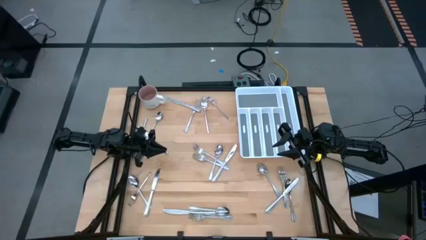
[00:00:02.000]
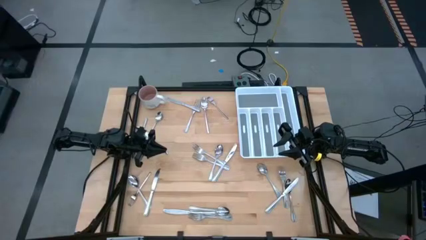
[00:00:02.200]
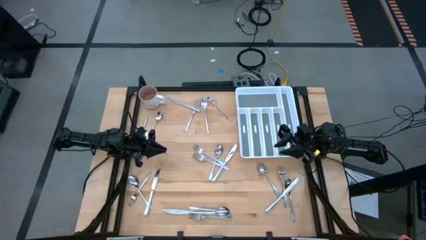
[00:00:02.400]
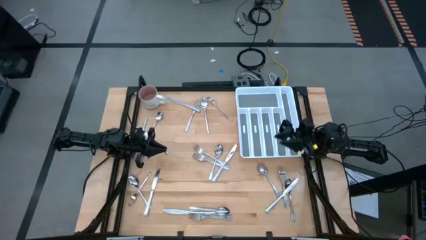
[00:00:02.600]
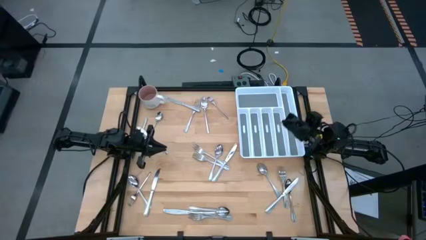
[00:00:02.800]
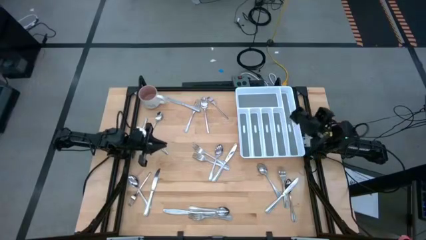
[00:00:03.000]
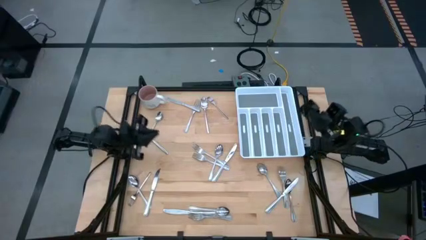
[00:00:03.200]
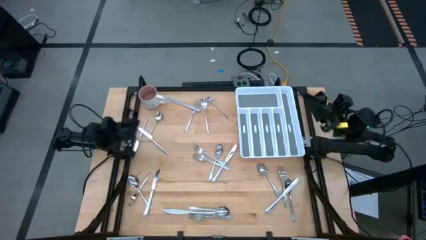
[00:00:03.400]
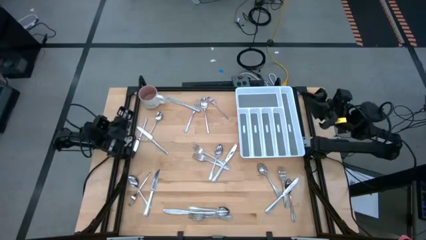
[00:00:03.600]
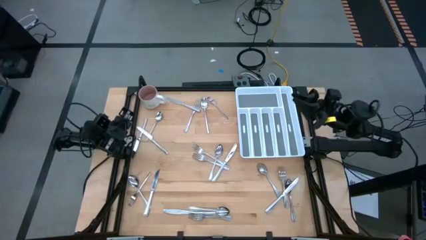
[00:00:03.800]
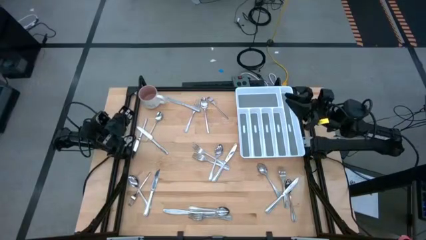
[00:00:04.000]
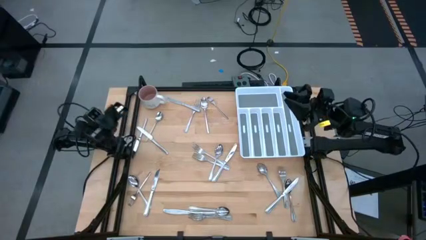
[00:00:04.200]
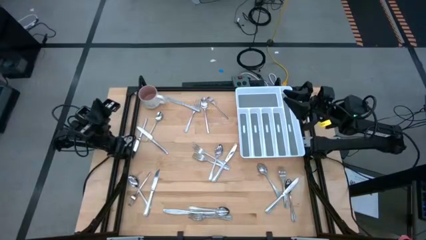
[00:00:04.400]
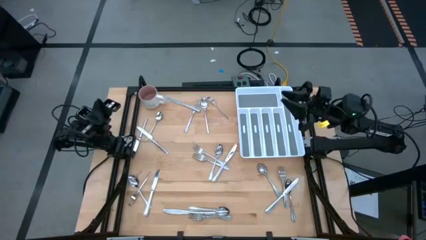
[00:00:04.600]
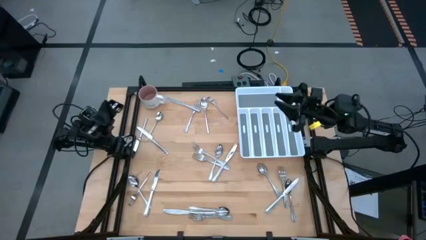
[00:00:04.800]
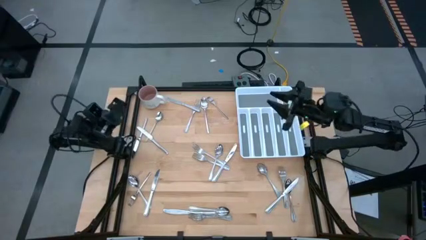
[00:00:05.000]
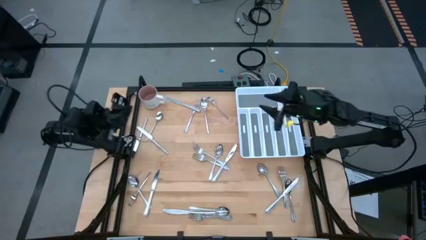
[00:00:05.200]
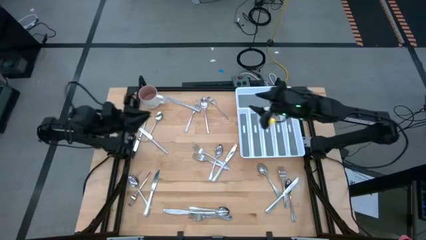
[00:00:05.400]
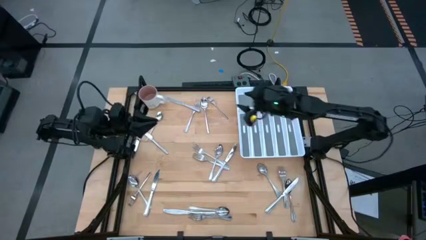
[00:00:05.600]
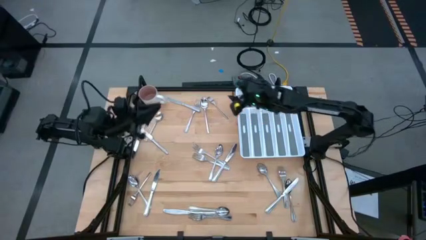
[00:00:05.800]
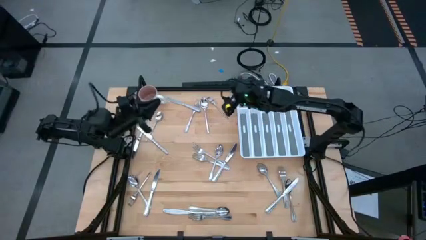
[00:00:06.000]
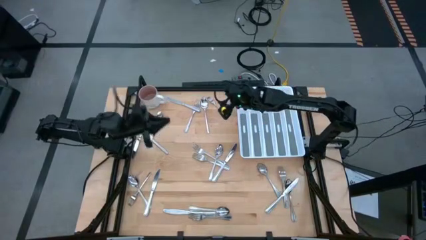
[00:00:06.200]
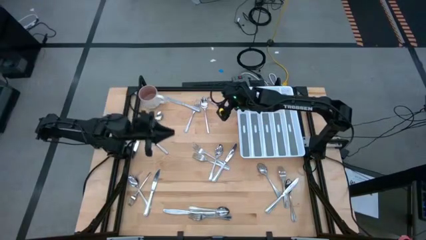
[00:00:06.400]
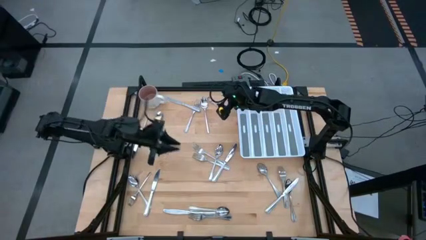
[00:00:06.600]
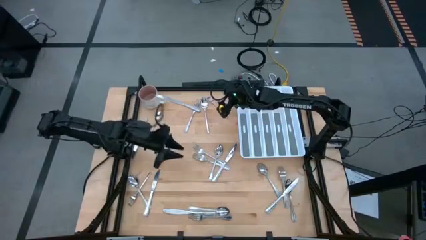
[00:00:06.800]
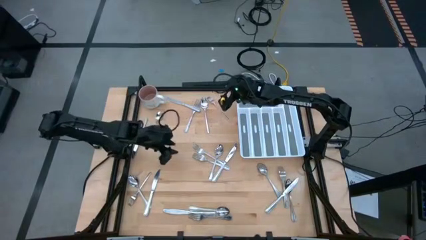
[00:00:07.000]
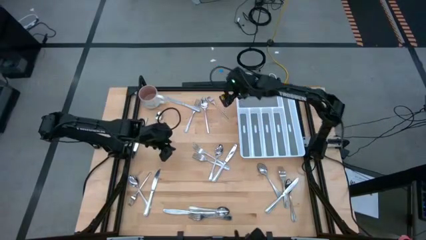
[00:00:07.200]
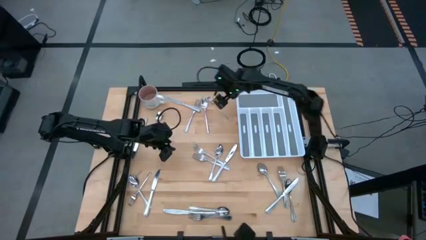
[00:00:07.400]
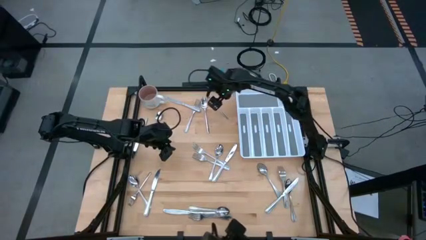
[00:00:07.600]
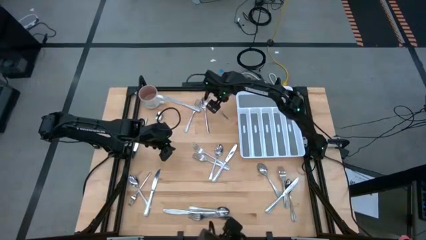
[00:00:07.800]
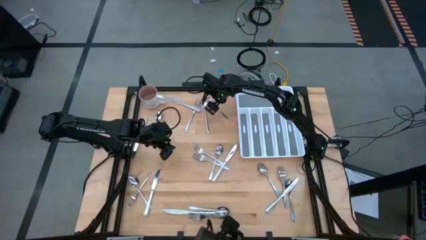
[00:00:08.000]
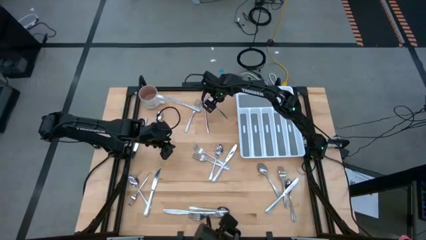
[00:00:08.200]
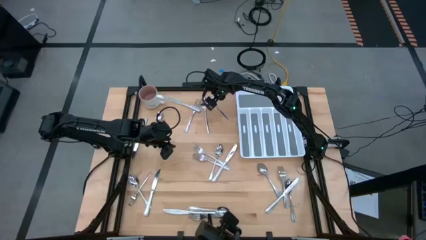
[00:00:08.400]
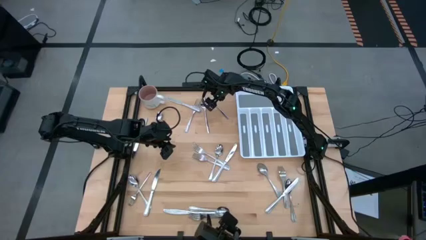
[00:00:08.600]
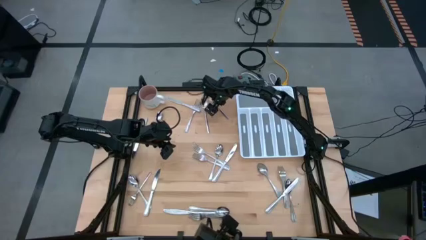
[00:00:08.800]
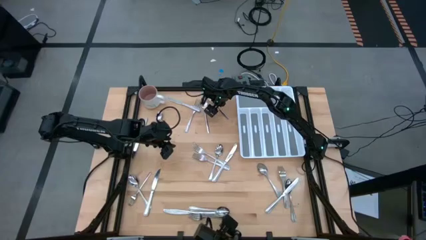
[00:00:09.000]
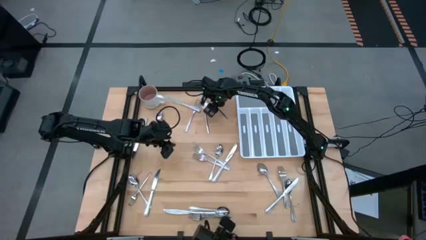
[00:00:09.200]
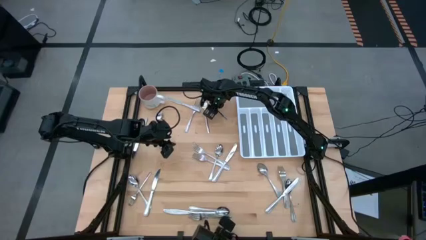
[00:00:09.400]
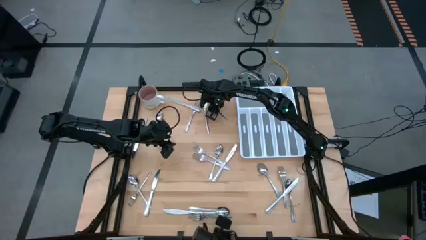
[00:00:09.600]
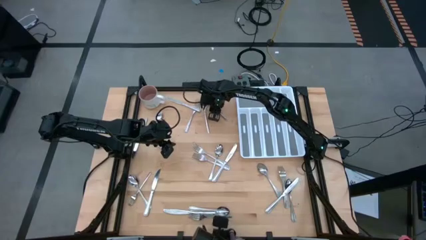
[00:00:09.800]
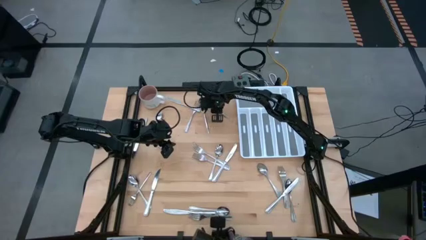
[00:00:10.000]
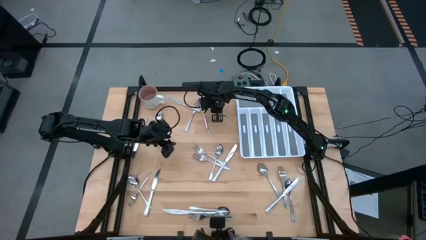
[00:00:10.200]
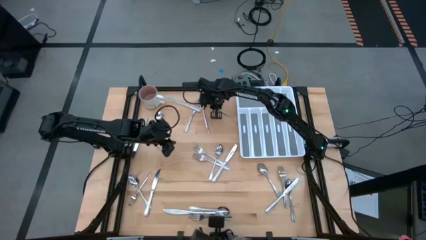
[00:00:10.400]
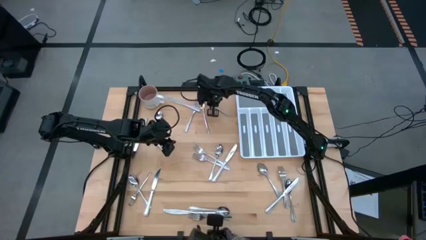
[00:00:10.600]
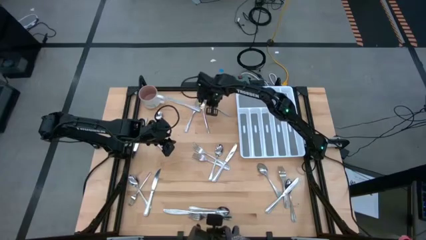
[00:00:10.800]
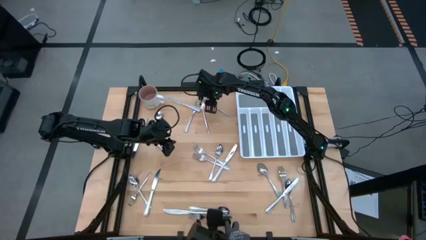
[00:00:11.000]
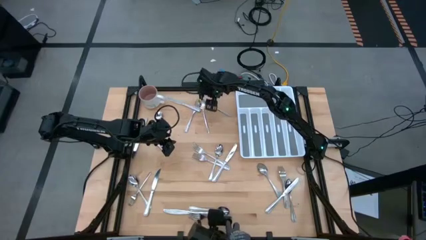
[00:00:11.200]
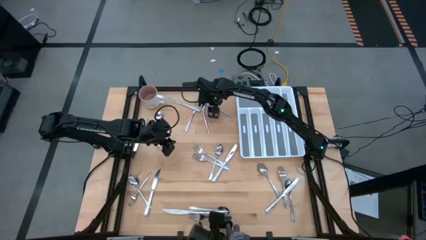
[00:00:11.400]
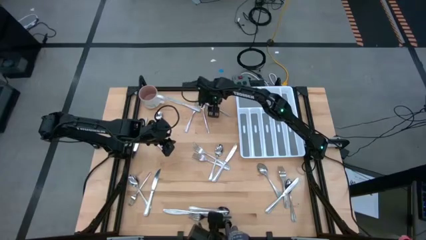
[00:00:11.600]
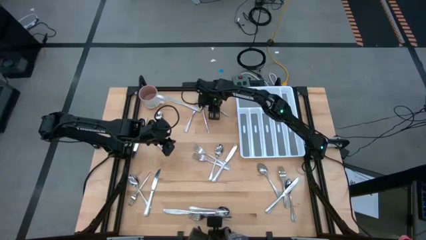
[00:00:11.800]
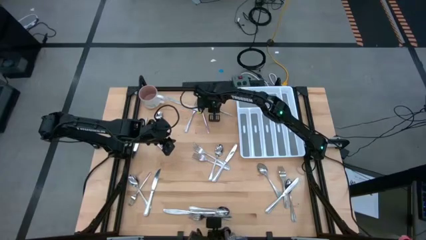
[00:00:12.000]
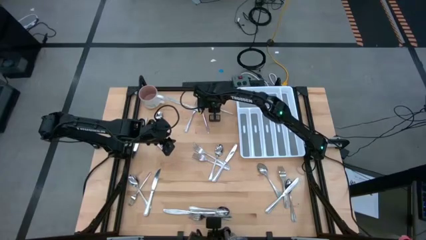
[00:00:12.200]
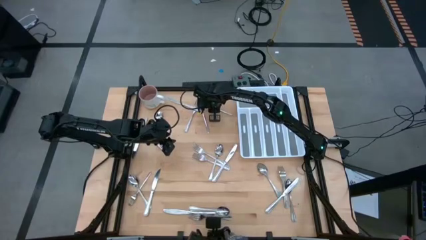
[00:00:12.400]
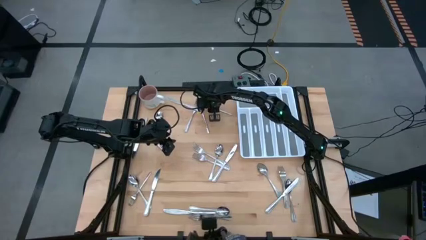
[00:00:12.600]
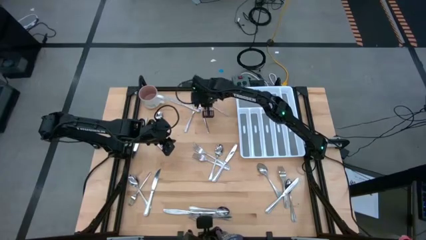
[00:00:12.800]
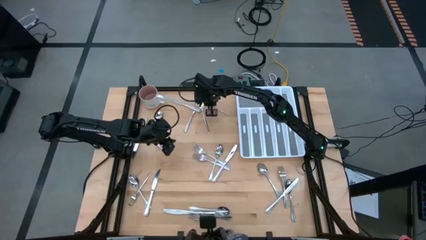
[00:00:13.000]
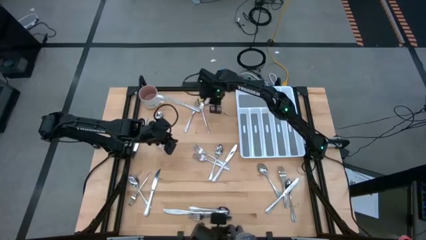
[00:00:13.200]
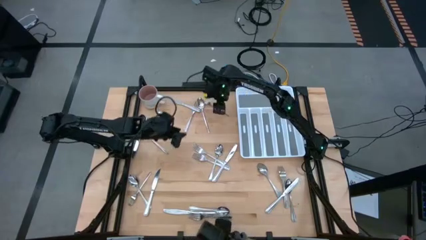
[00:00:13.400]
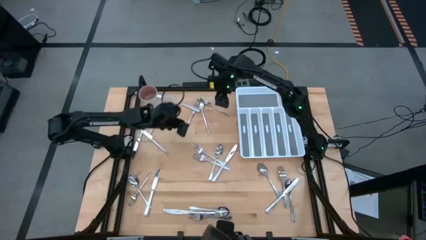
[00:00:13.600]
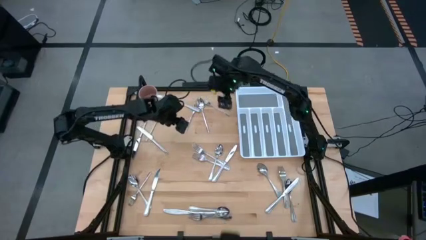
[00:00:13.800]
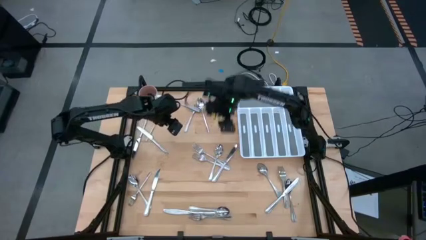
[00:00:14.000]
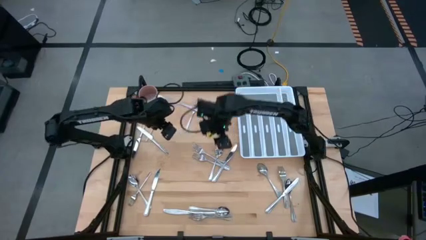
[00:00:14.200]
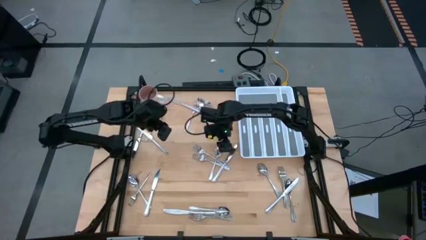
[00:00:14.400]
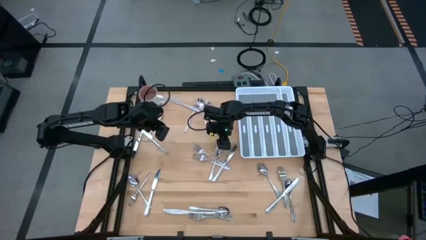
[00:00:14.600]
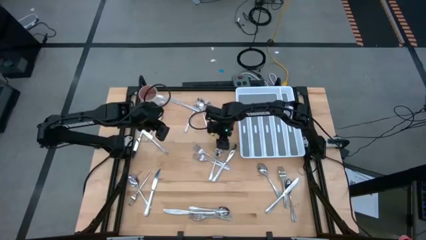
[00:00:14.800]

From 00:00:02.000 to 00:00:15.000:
Task: Sort silverware
Put the silver fork into the silverware tray

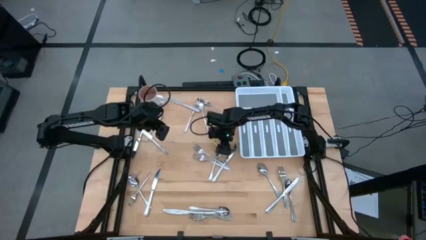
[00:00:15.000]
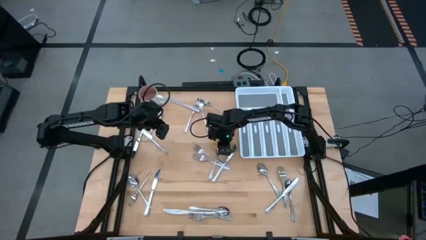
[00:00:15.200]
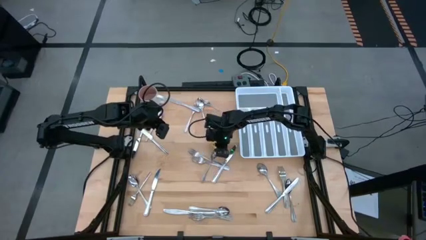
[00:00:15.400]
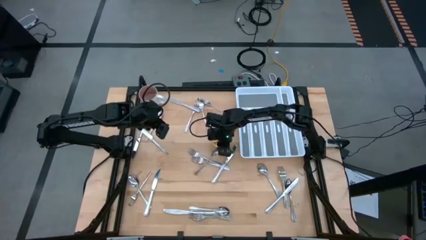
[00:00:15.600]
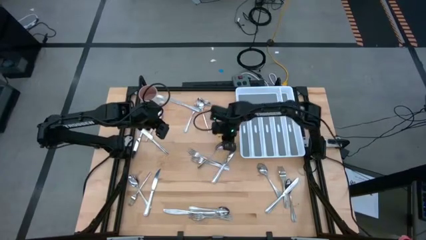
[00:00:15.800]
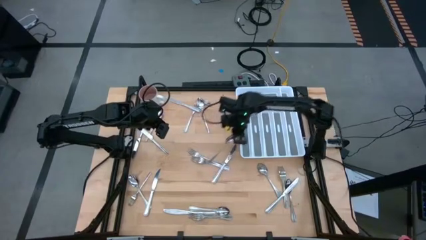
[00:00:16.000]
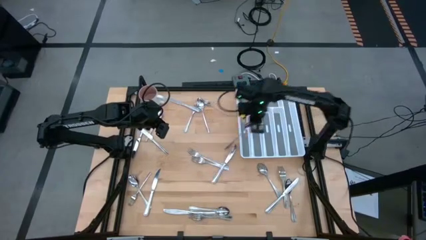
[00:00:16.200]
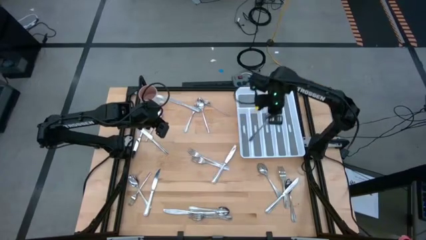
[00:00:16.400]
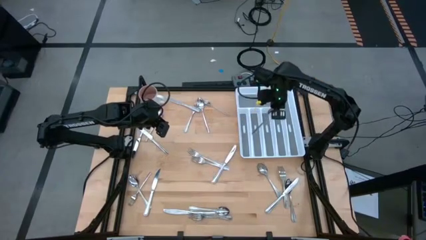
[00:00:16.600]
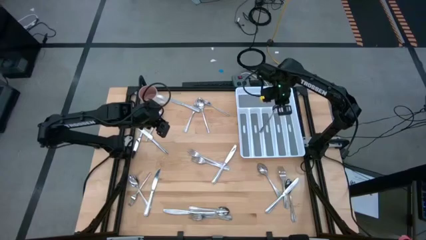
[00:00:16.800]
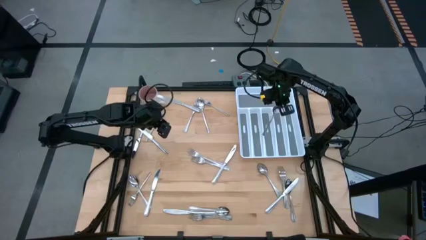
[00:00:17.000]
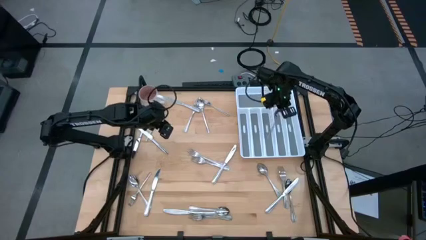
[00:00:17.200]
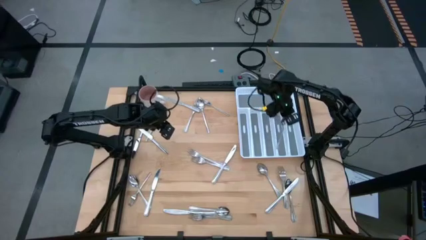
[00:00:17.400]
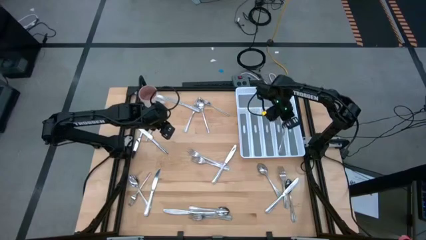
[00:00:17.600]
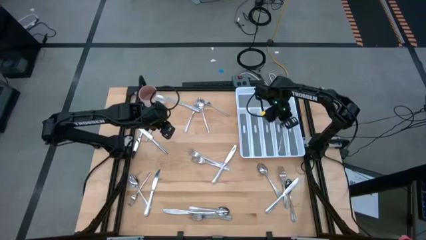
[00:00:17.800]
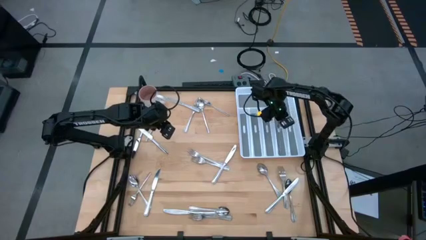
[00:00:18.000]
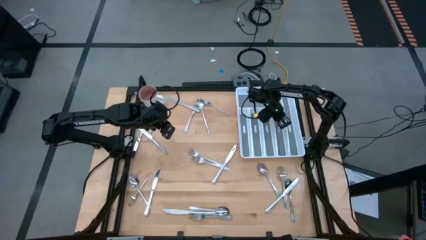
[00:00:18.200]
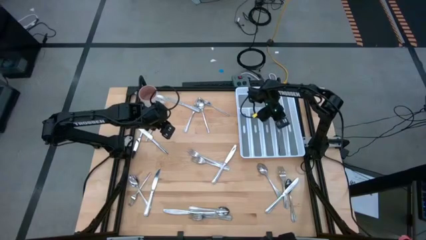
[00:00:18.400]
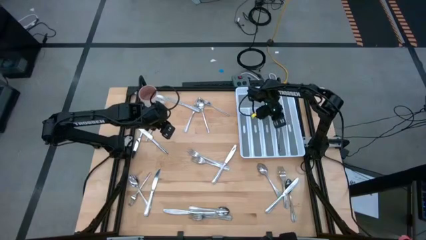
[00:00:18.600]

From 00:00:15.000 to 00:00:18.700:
Put the silver spoon into the silverware tray
